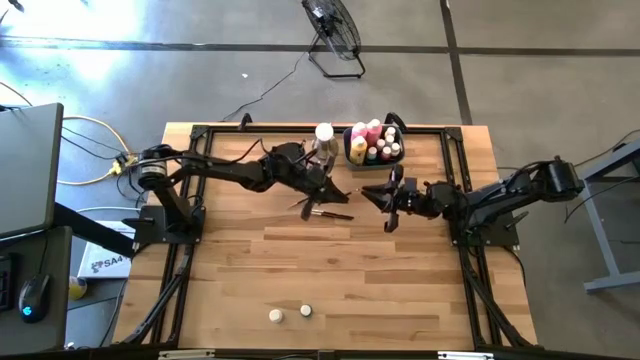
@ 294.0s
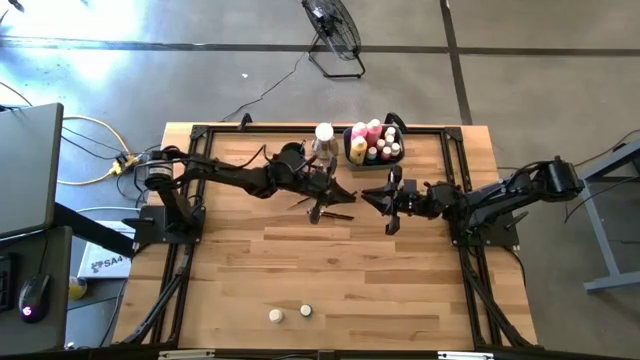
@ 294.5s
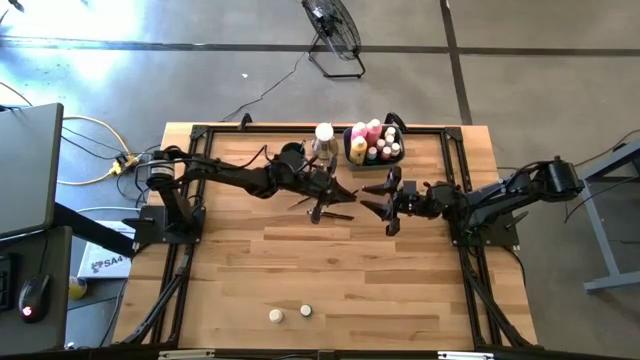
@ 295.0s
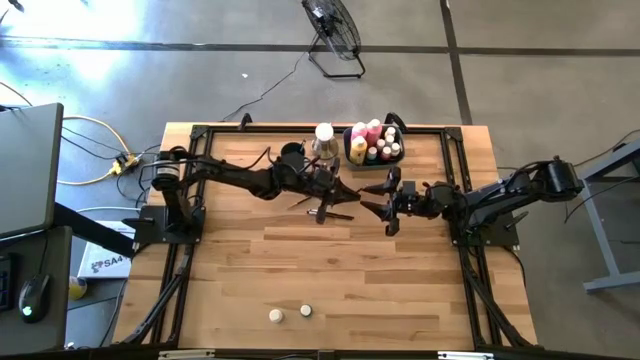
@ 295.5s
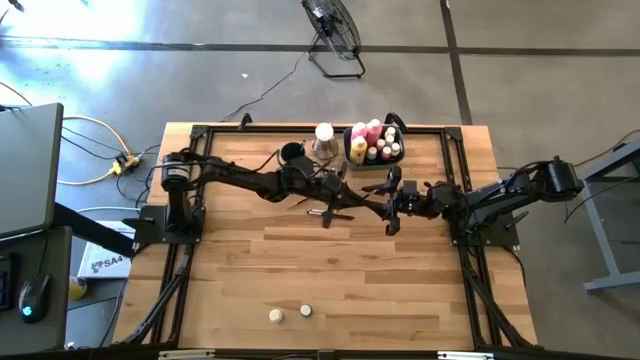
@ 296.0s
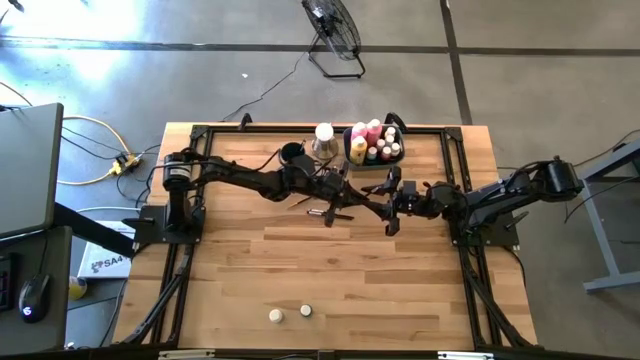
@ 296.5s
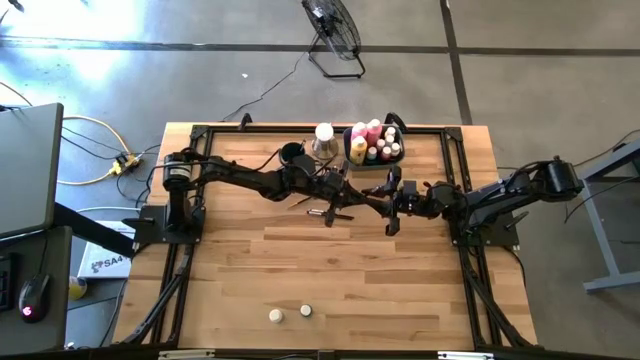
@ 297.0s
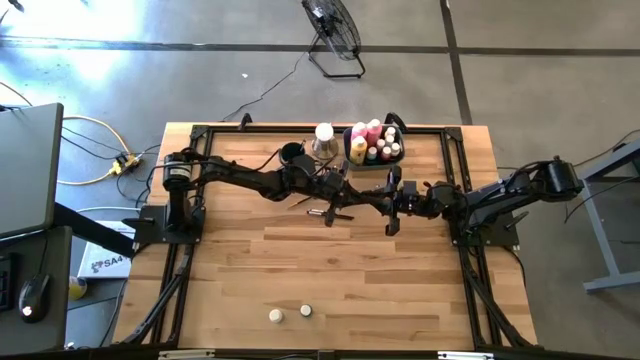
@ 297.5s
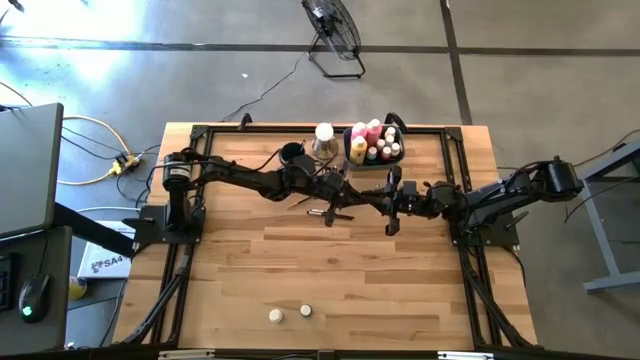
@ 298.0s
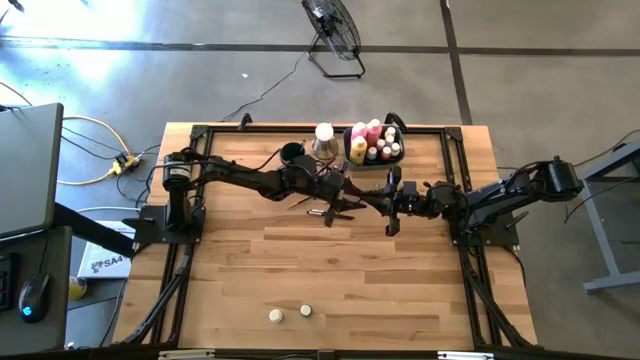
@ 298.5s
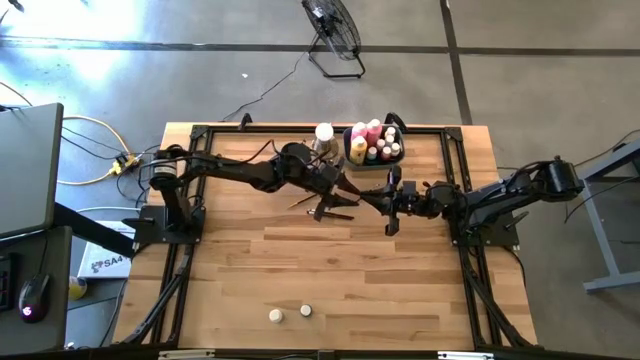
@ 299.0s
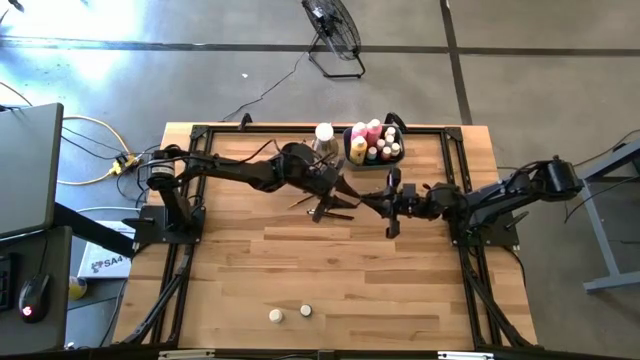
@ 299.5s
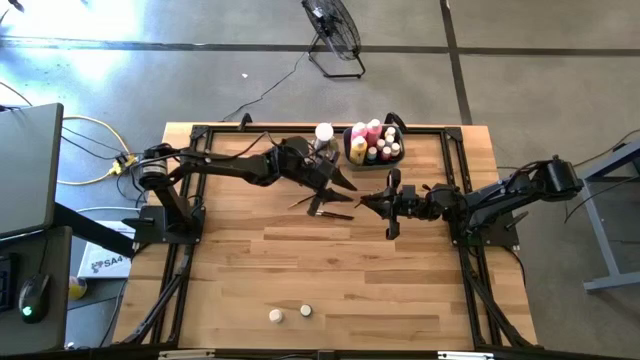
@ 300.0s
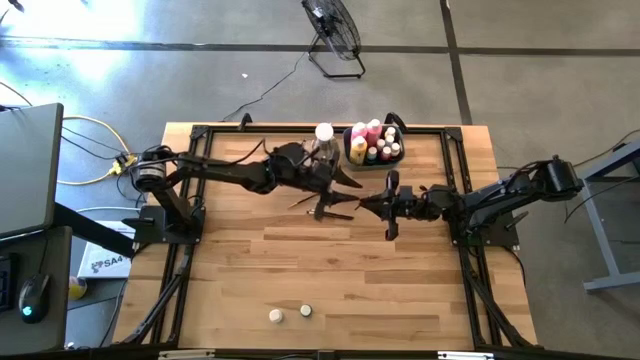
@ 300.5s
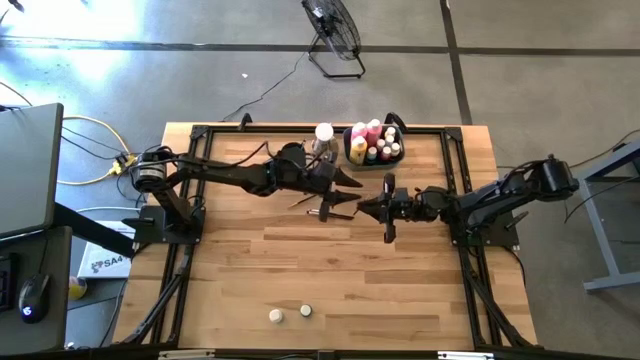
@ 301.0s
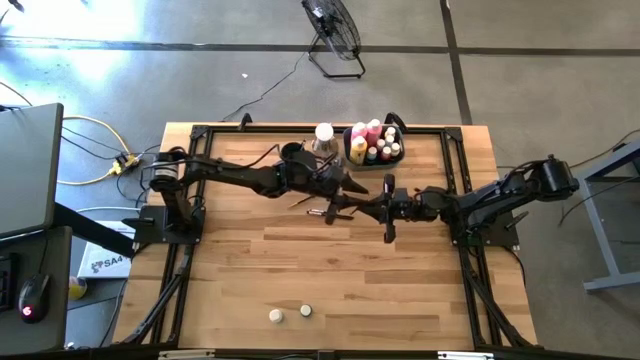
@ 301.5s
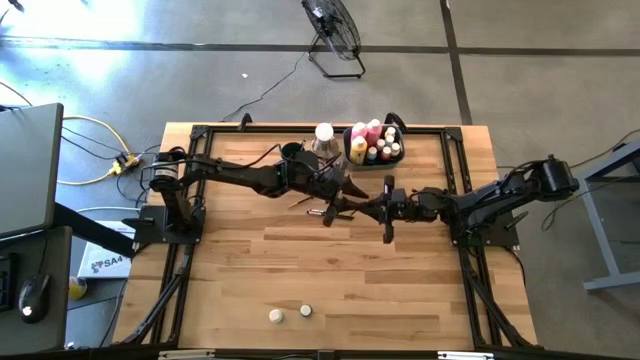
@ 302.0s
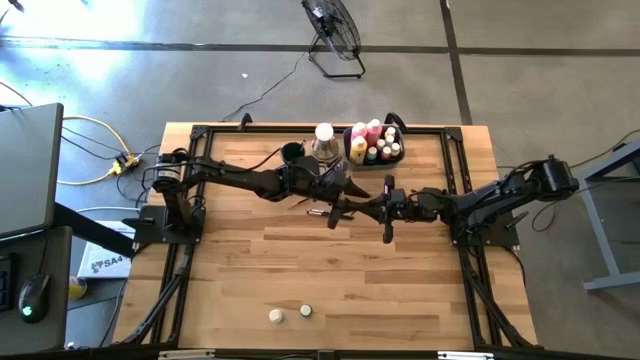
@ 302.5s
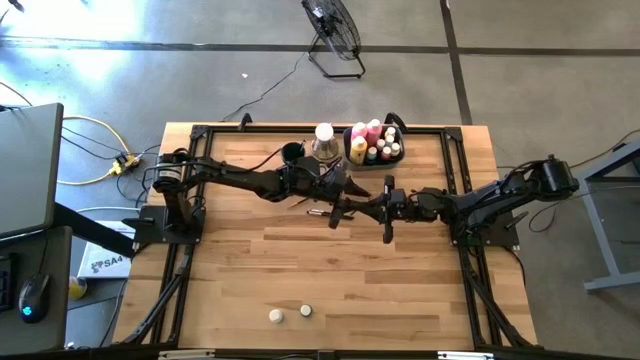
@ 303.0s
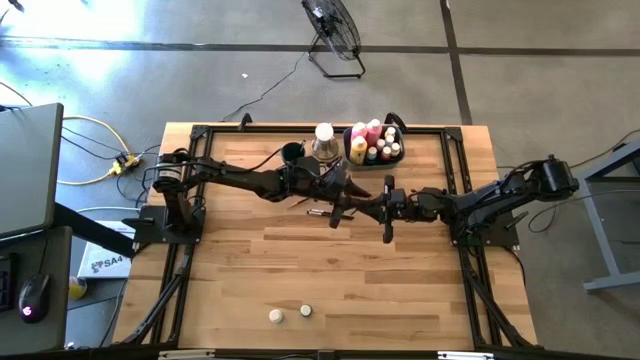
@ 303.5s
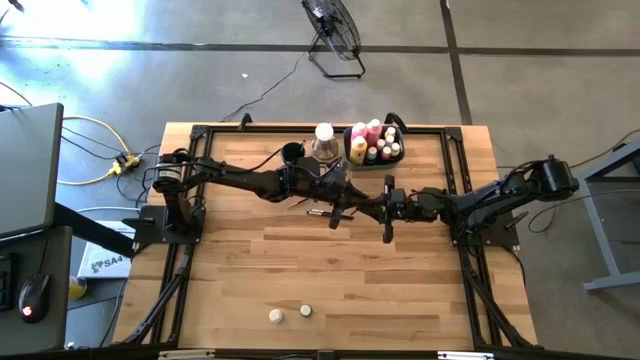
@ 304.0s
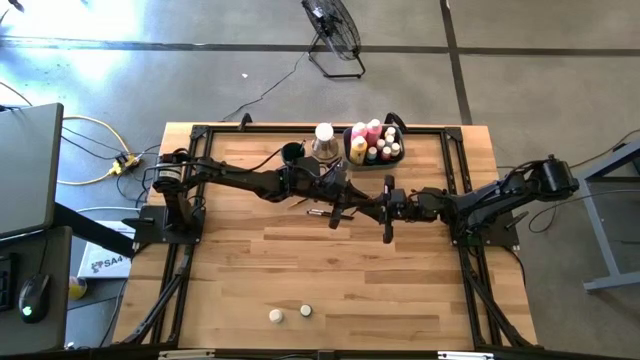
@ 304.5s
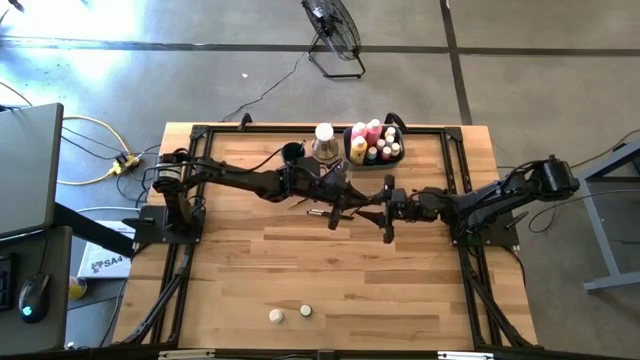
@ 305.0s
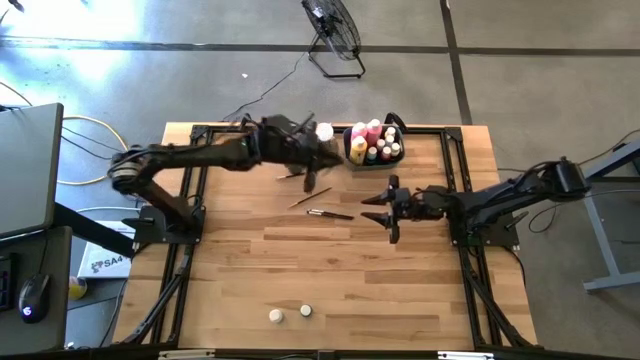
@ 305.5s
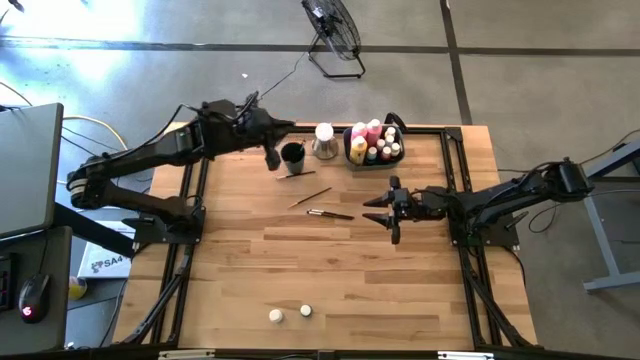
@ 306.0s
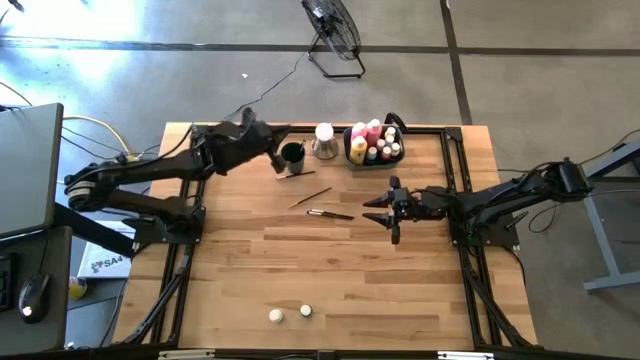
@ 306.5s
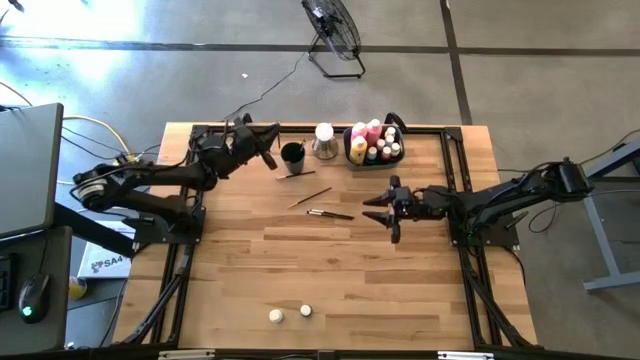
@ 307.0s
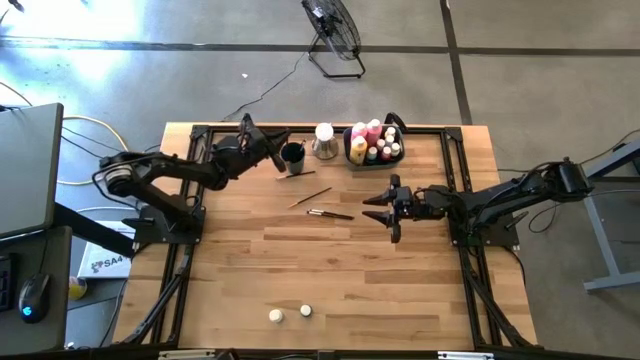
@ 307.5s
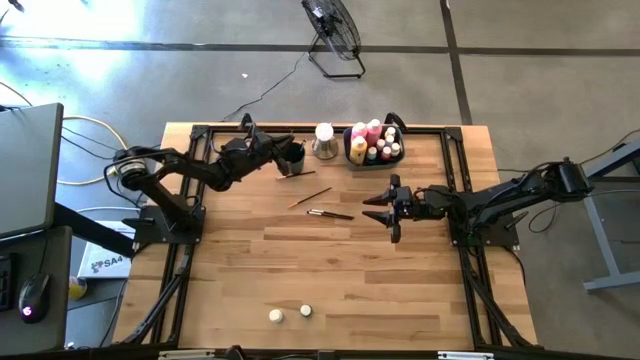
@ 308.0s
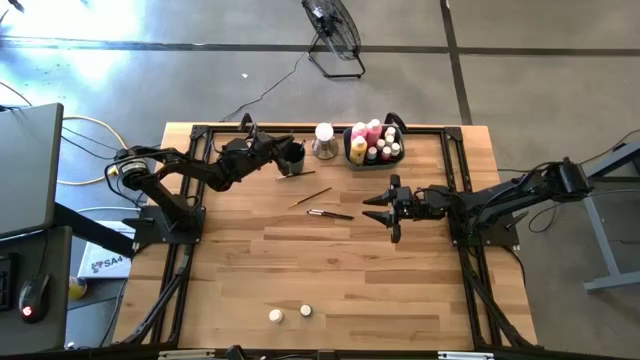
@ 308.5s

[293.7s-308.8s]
Task: Pick & Place Paint Supplies
Put the silver paintbrush into the blue cup
